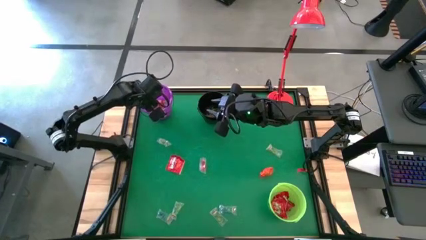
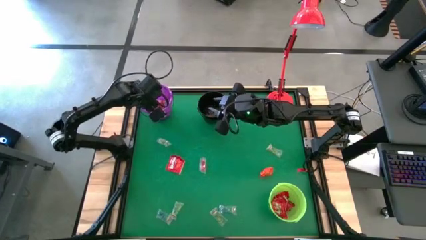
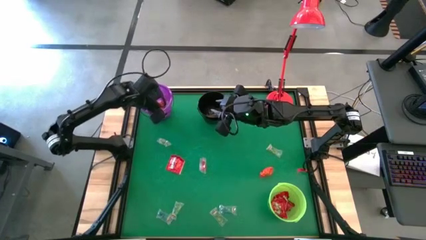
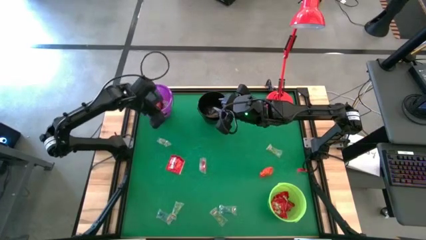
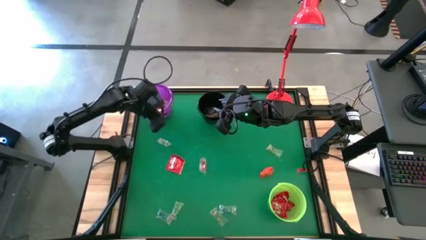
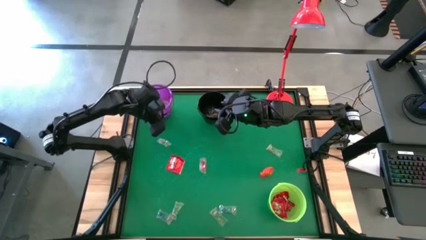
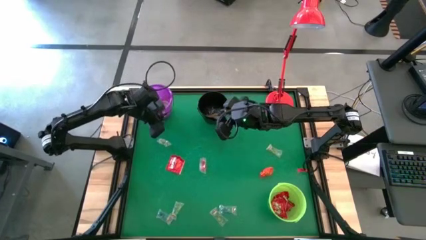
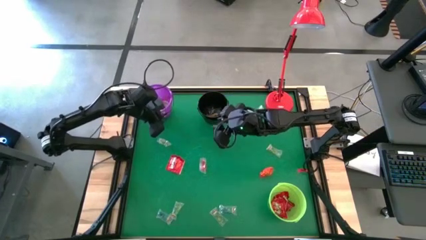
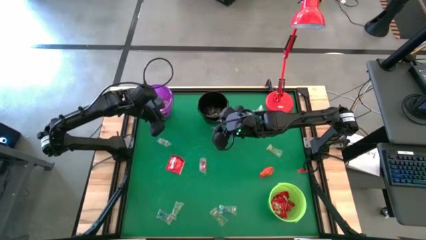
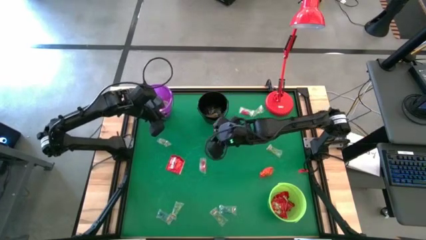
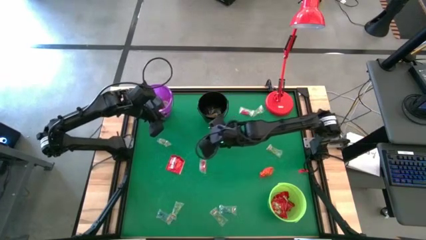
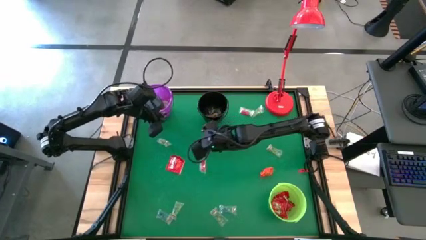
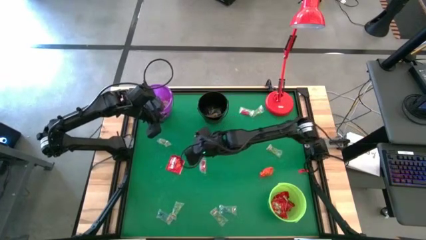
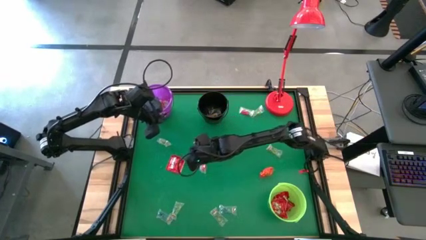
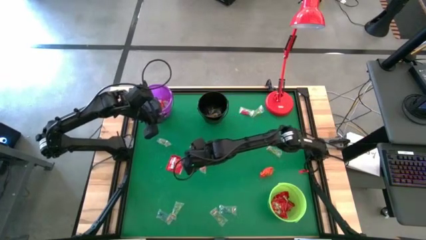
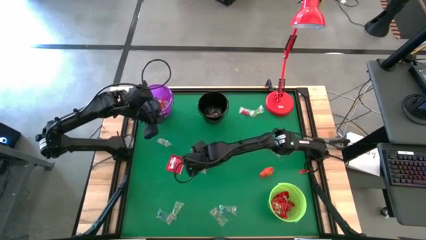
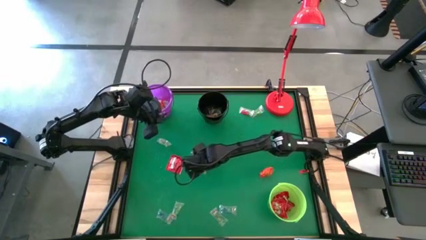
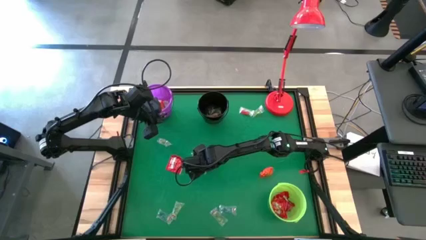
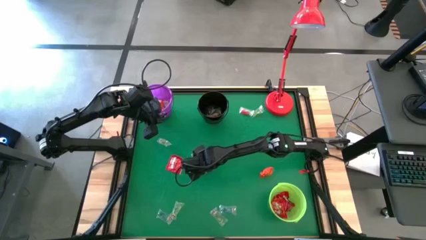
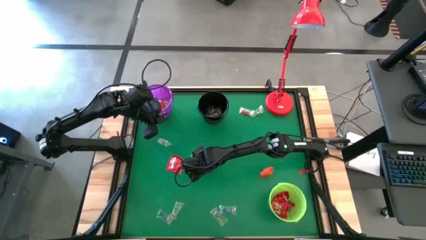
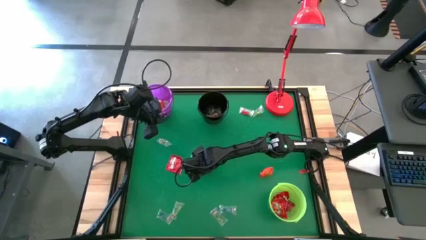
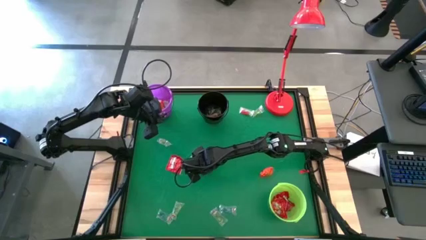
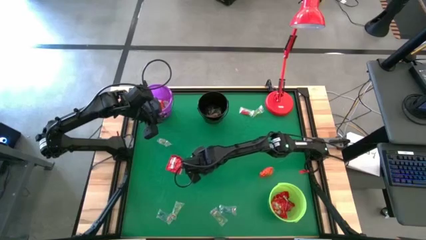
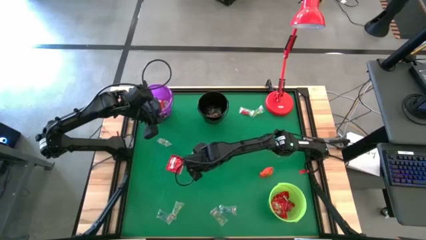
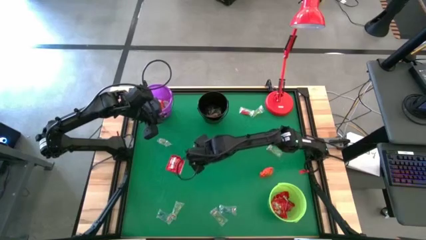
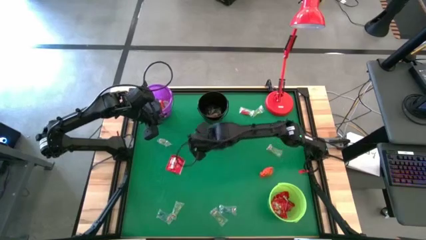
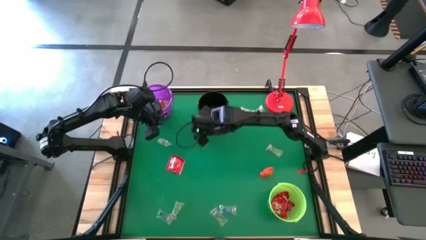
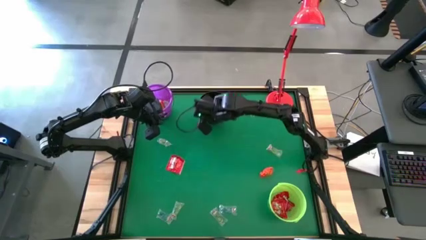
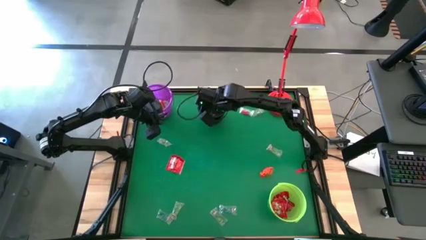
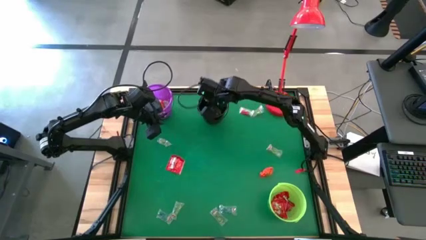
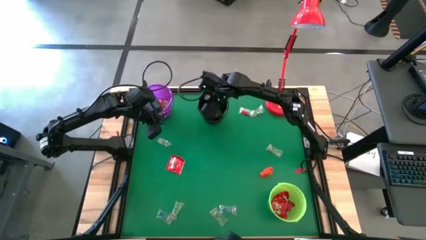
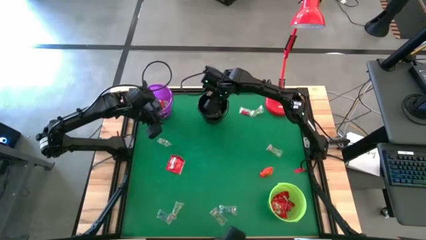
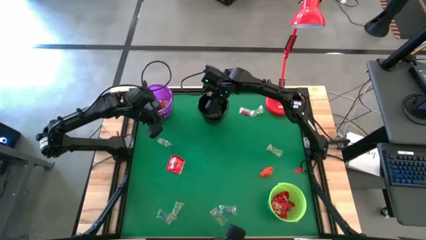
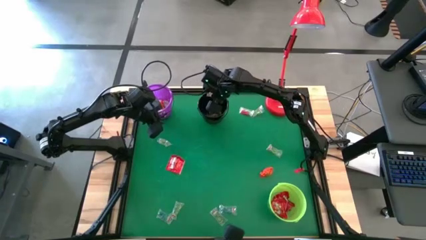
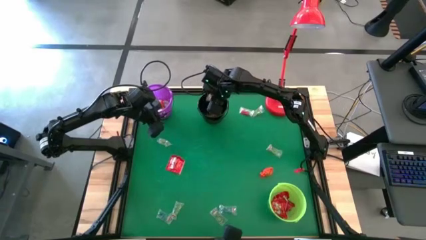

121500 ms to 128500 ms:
Task: Sort candy
Put the bottom red gummy into the black bucket

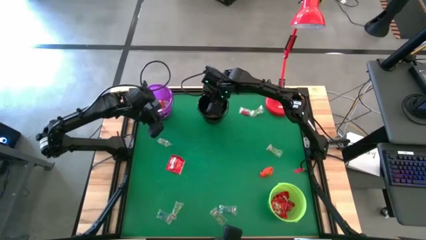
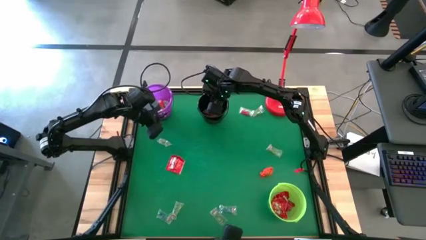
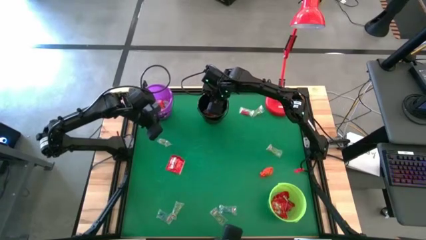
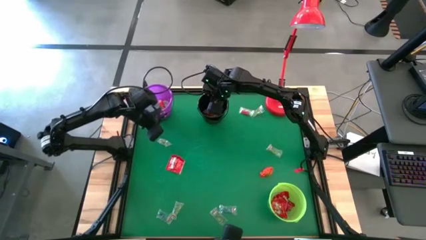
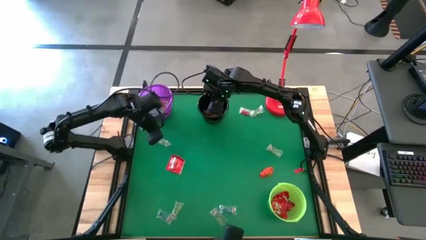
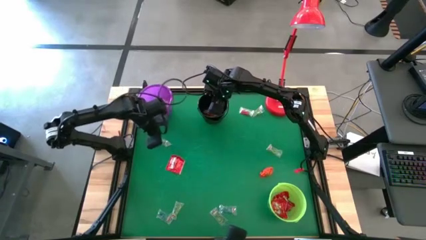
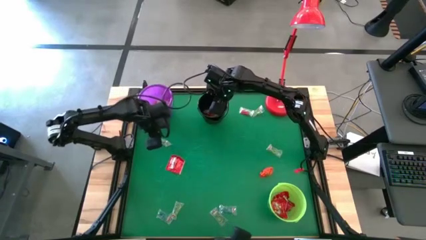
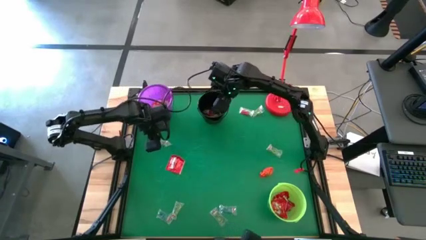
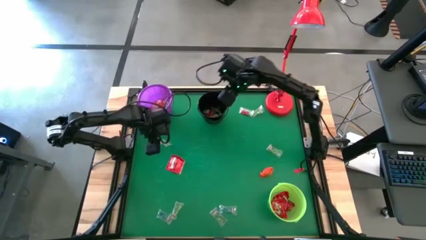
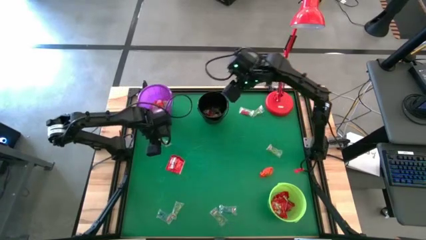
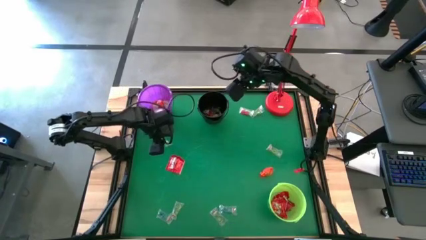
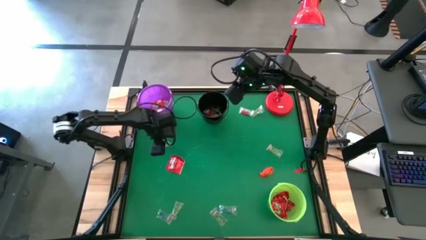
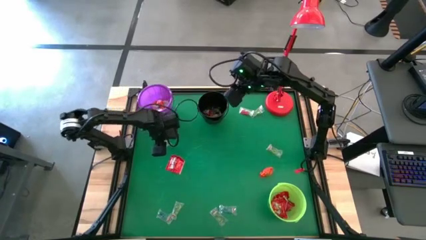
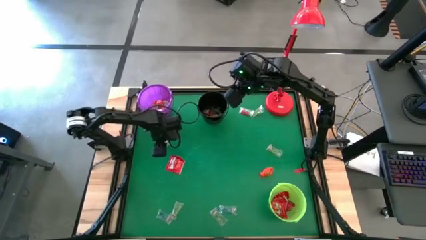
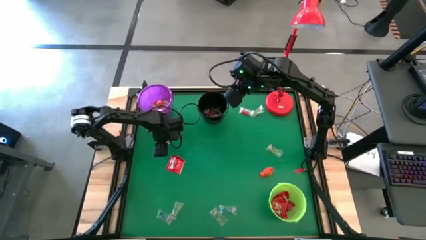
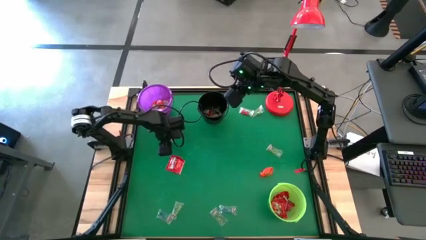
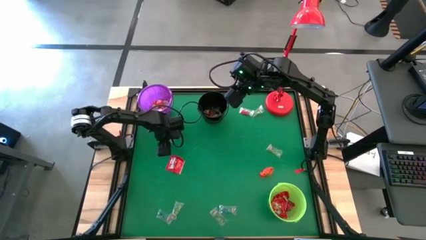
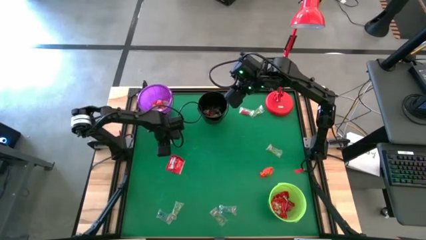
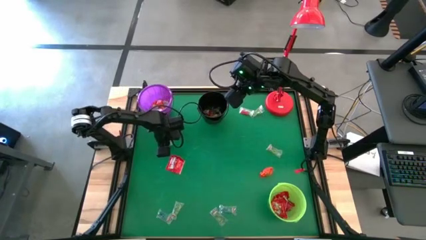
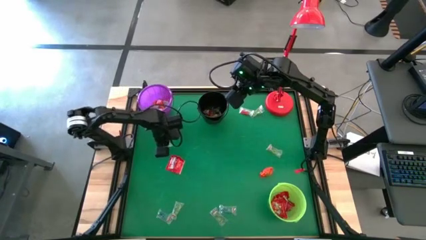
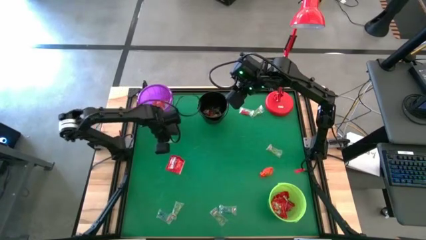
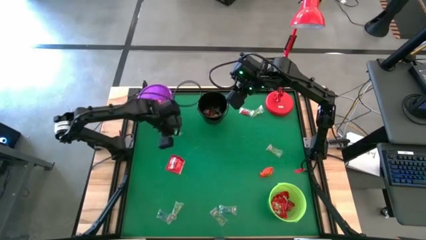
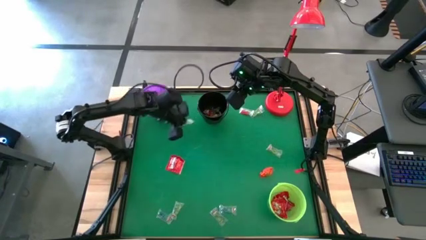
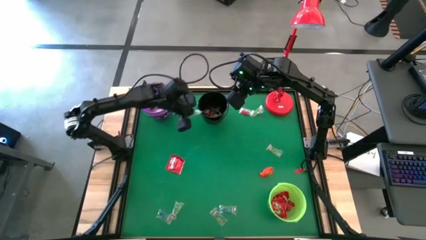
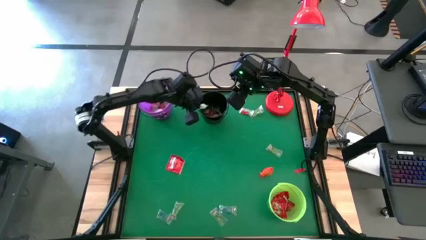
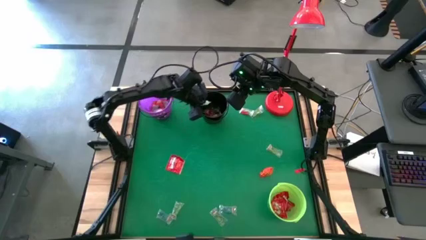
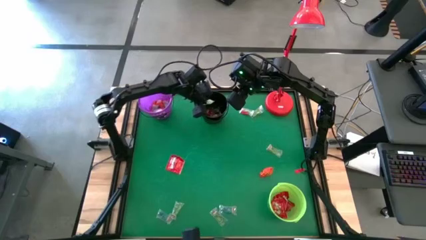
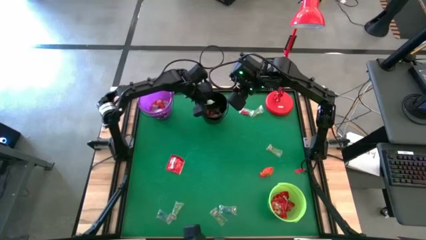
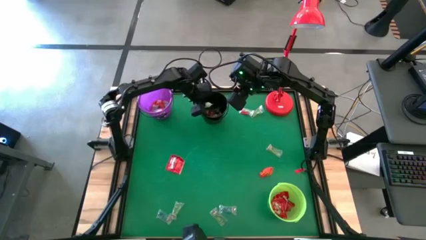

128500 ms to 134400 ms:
Put the green gummy into the black bucket

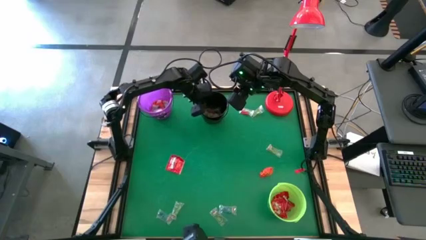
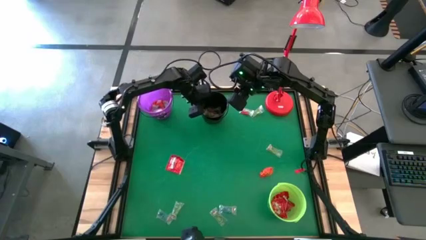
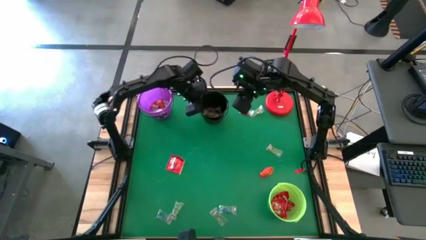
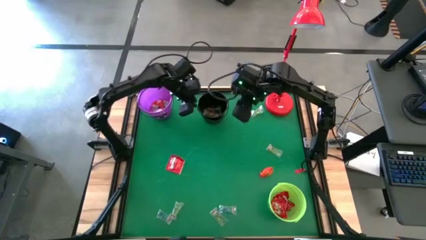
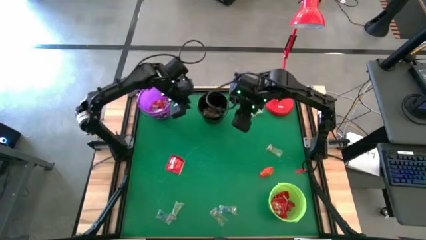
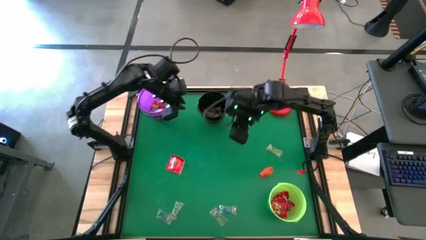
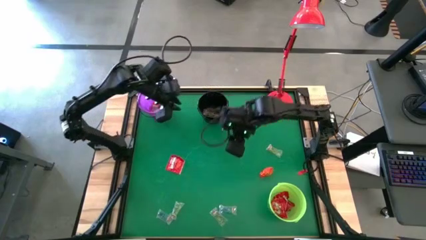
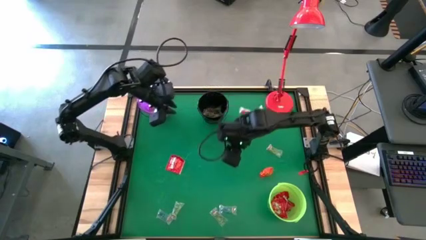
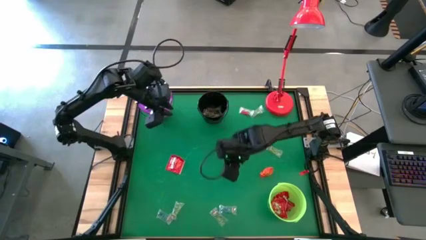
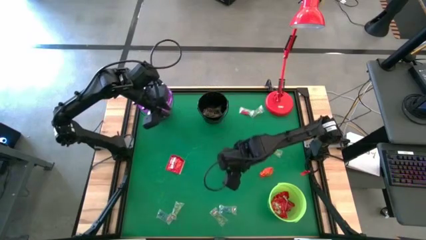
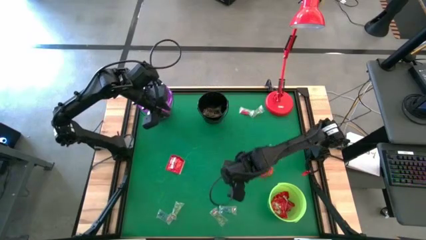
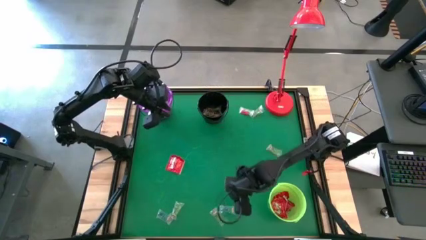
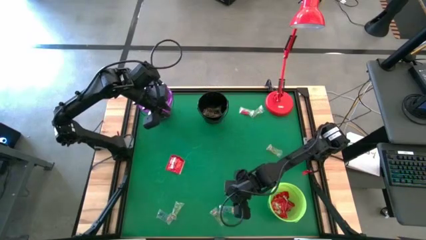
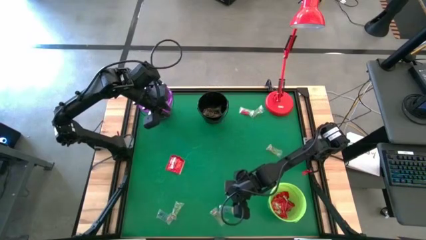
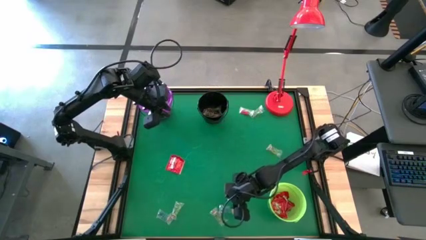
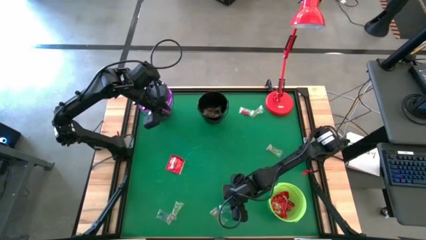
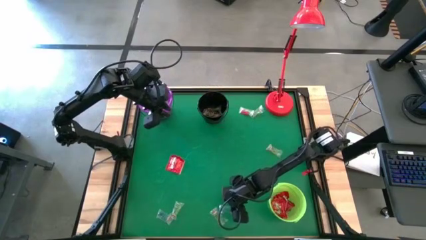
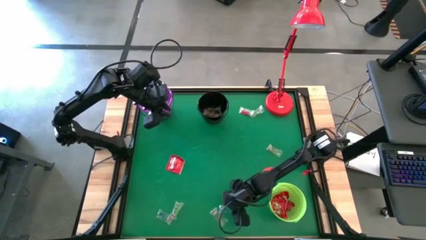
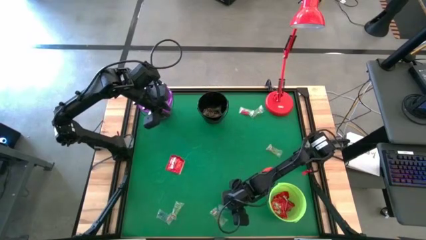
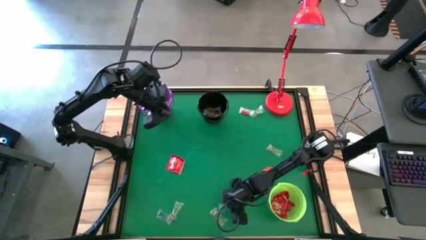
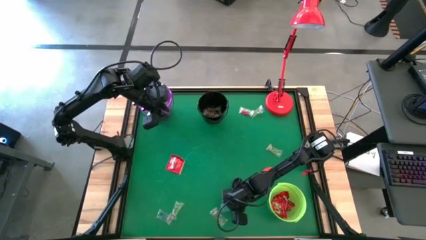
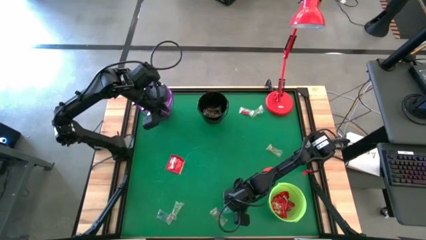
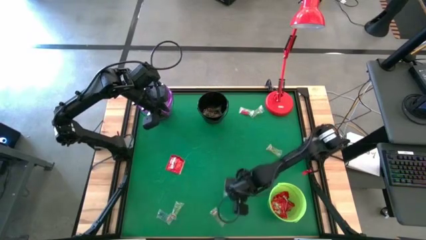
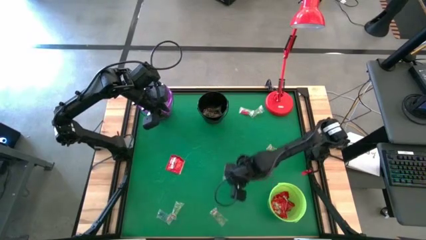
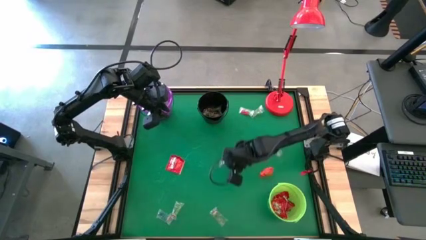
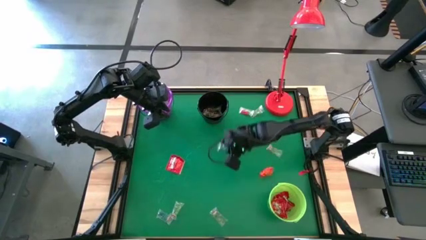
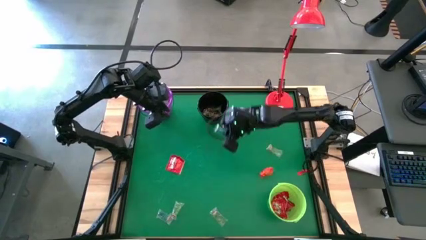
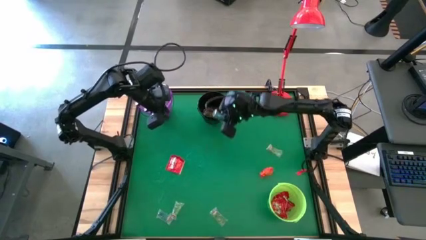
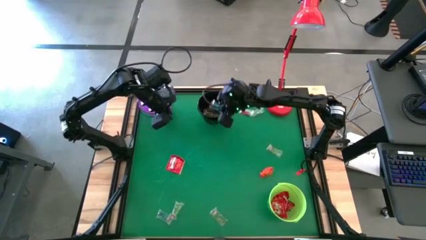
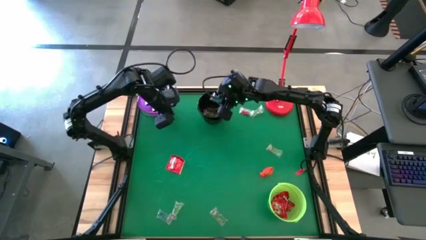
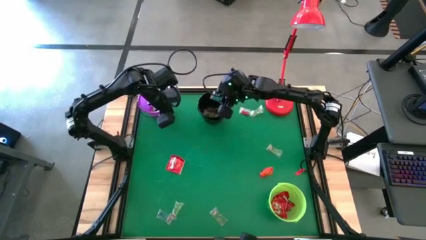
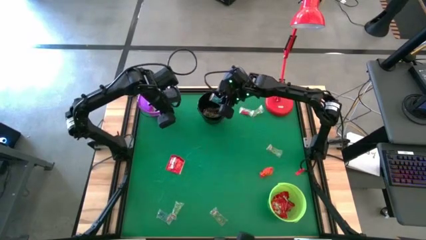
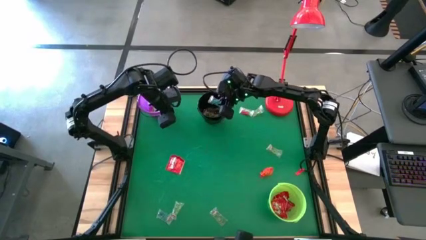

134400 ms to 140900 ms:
Put the right blue gummy into the black bucket
